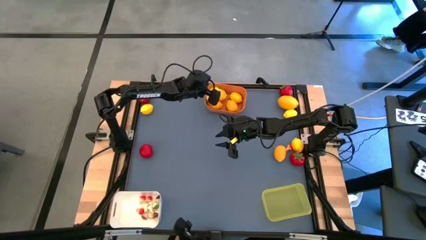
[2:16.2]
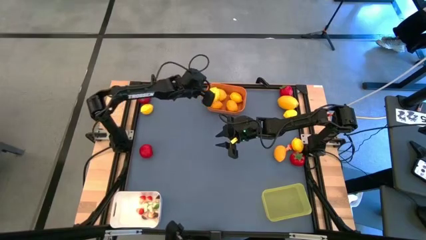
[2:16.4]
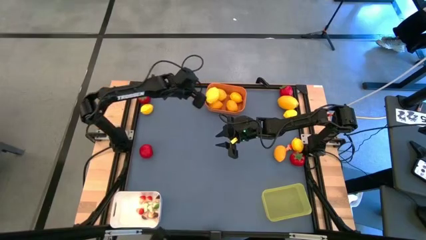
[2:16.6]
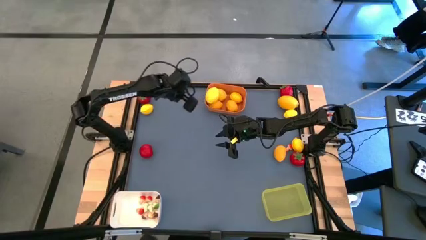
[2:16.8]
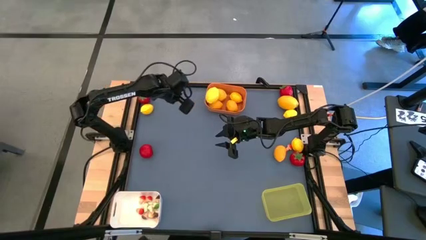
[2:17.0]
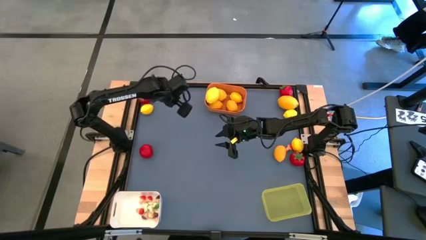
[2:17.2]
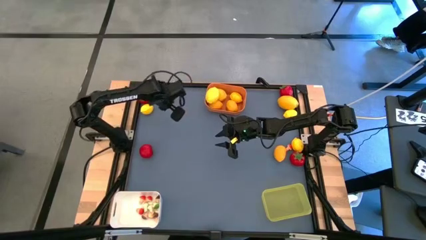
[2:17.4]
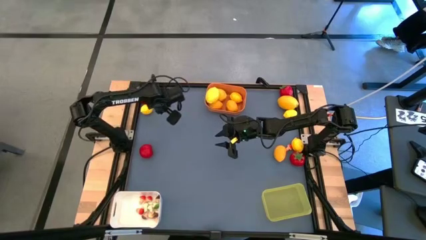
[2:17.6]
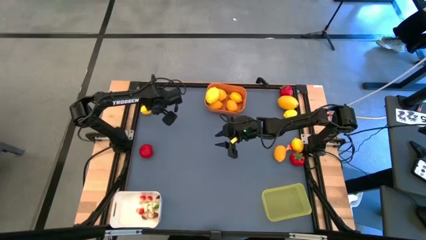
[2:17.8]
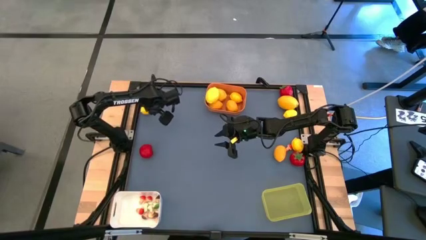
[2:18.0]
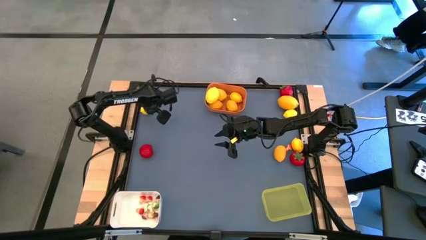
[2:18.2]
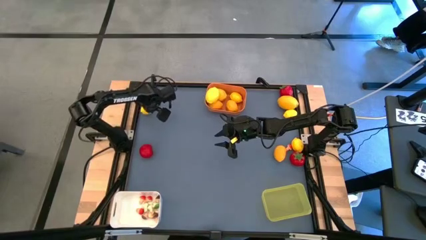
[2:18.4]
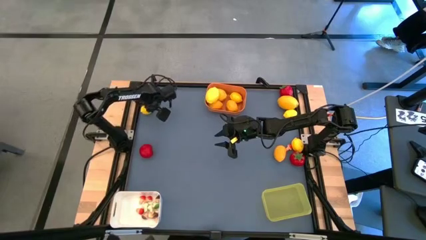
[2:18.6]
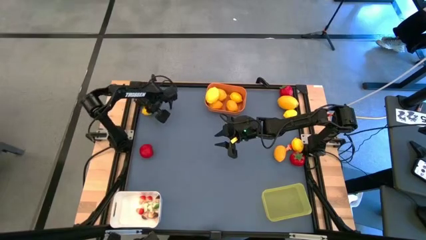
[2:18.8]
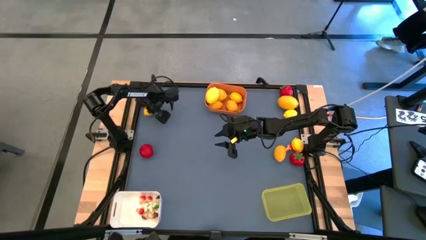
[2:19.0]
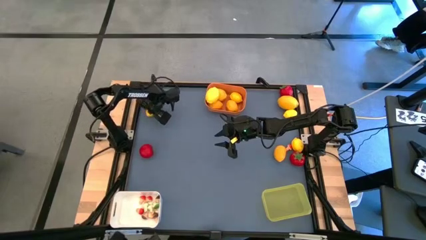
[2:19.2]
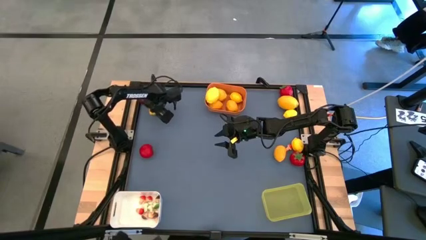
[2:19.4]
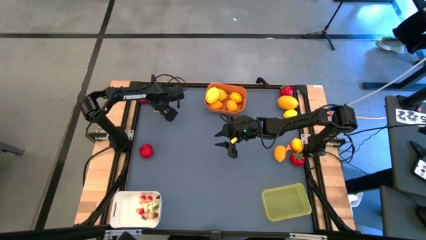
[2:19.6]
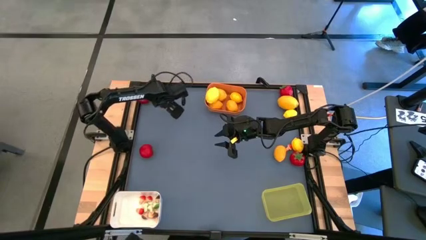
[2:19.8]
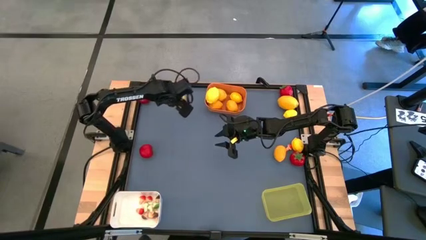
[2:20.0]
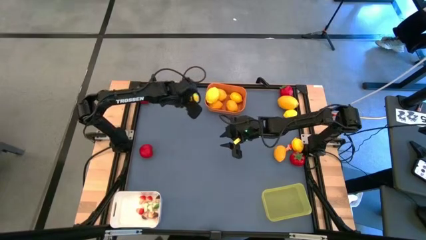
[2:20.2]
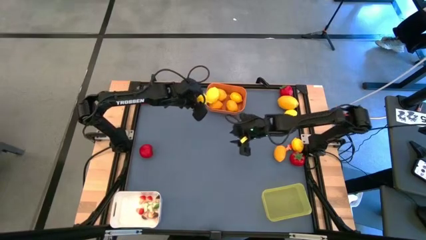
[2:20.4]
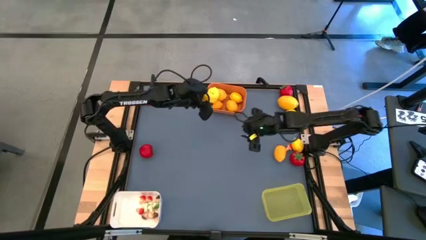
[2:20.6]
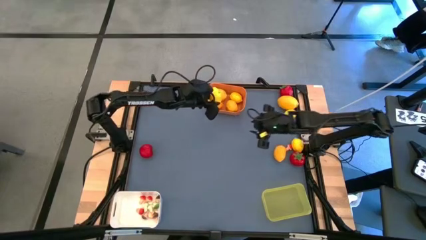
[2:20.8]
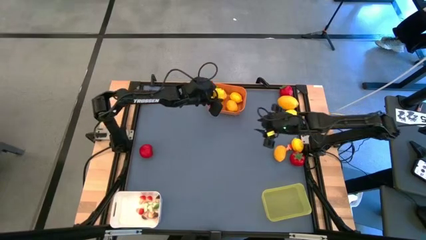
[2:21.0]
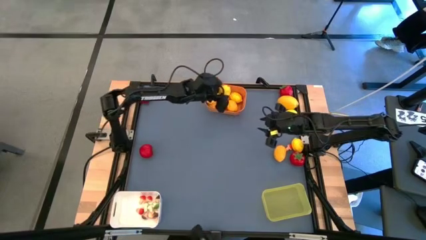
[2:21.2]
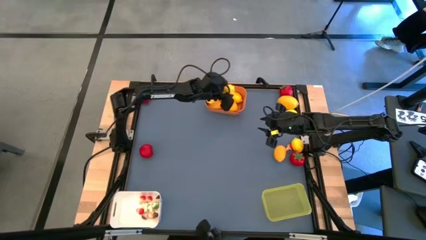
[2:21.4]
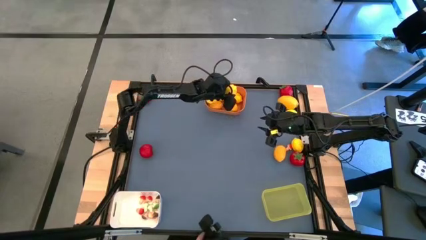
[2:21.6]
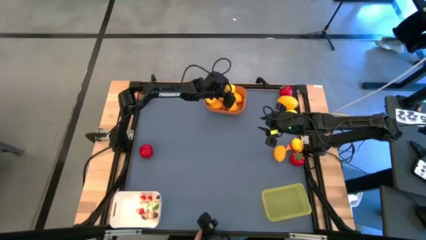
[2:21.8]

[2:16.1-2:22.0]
Task: Sort produce into baskets
Put the yellow lemon into the orange bin

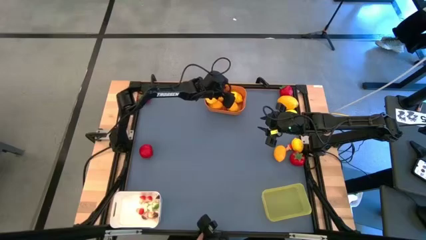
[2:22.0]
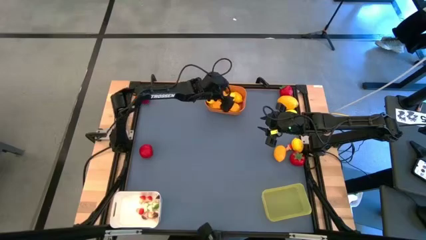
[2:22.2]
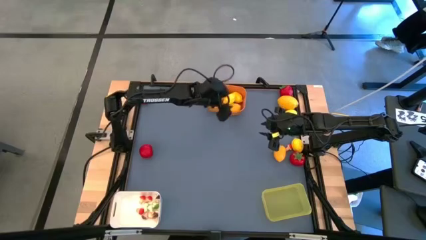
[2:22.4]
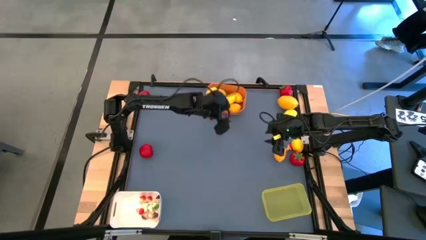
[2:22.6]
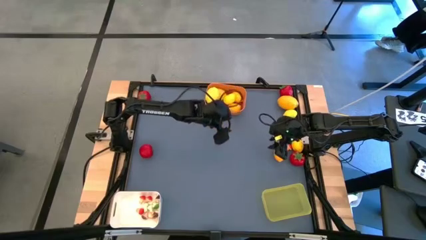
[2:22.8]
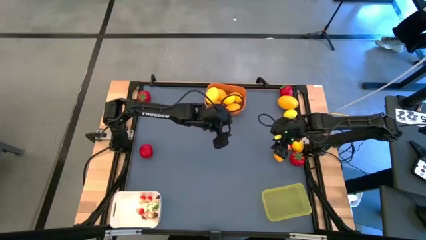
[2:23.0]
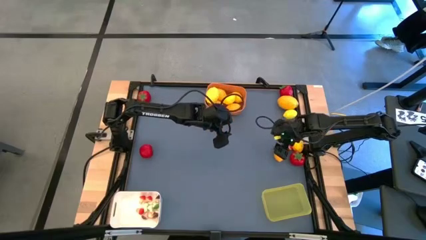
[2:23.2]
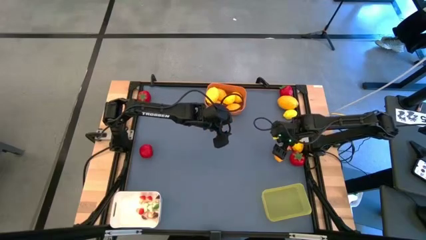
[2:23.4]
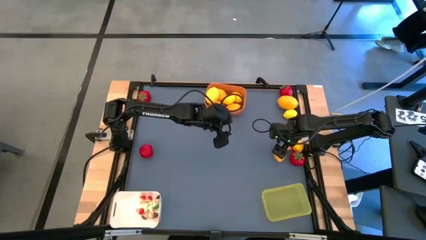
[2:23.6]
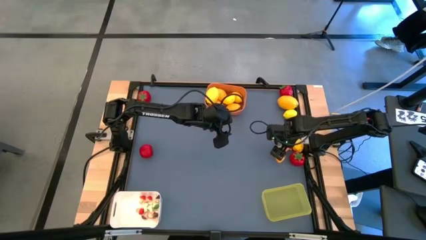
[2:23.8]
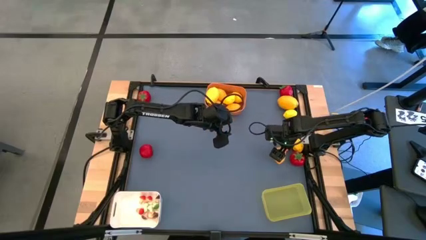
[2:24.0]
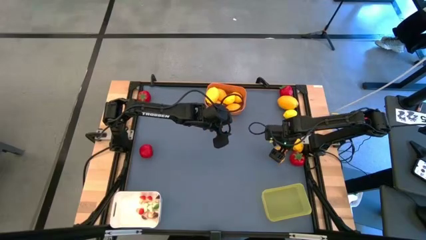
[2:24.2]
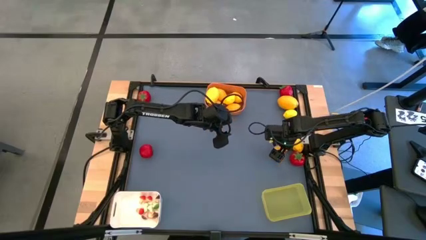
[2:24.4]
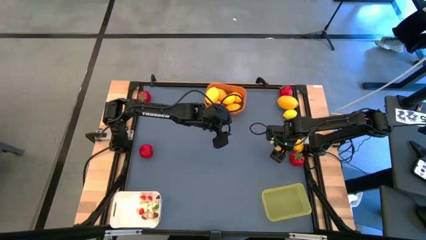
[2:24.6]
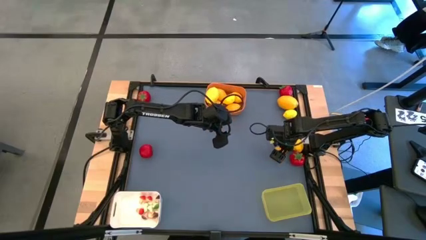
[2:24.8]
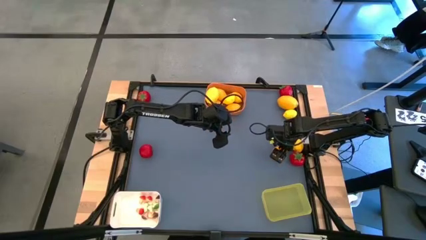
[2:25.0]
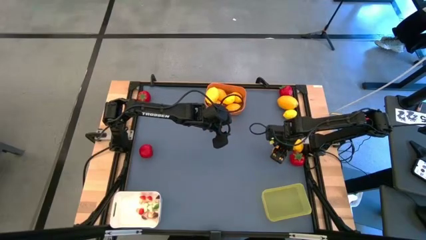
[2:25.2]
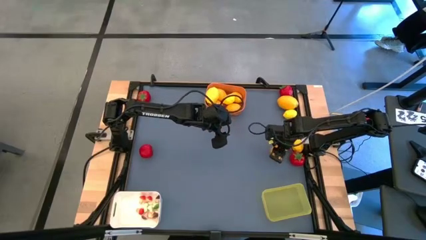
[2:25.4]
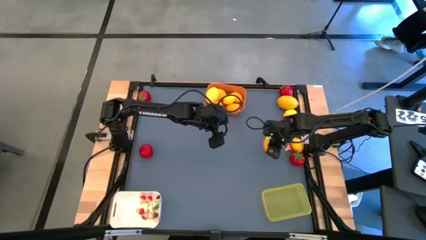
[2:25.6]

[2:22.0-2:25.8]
Put the yellow lemon into the orange bin

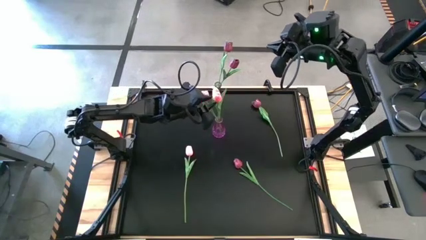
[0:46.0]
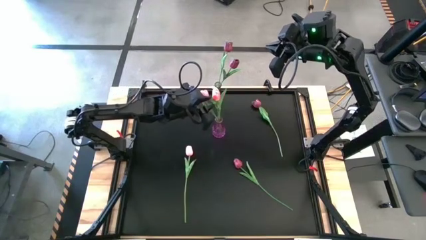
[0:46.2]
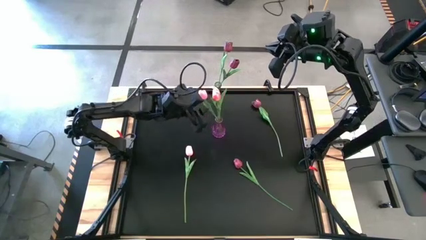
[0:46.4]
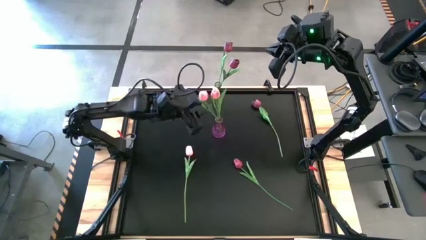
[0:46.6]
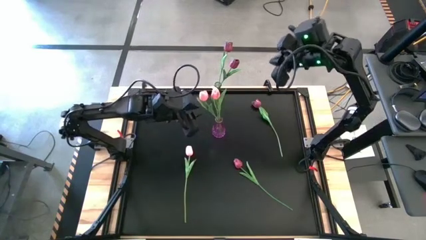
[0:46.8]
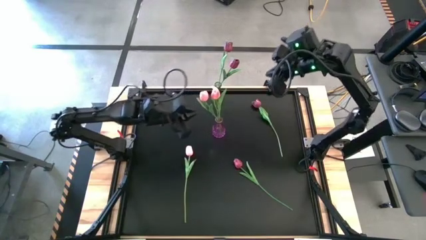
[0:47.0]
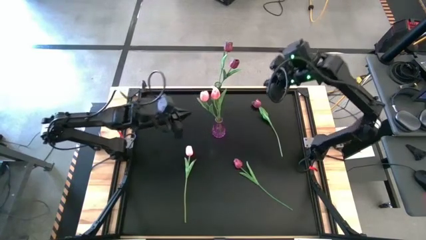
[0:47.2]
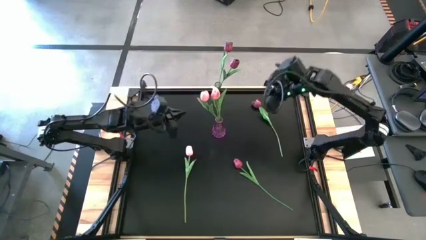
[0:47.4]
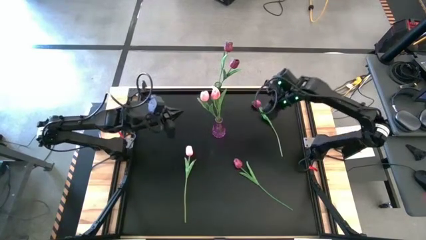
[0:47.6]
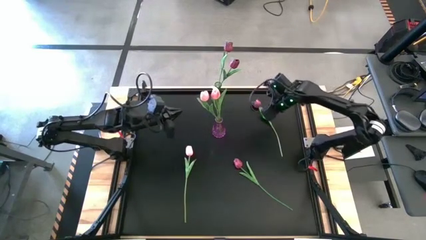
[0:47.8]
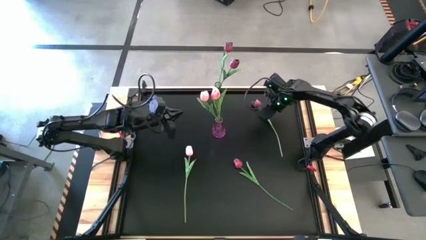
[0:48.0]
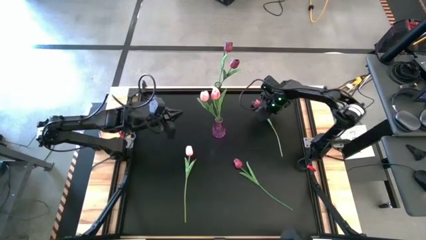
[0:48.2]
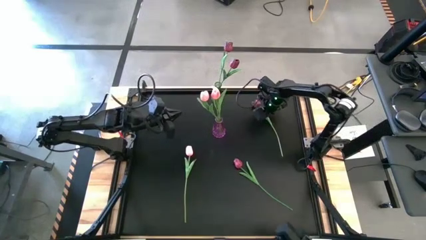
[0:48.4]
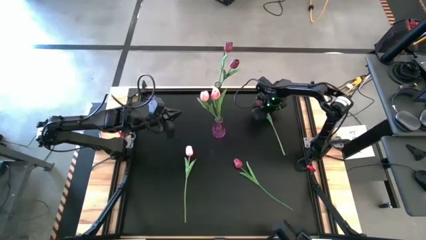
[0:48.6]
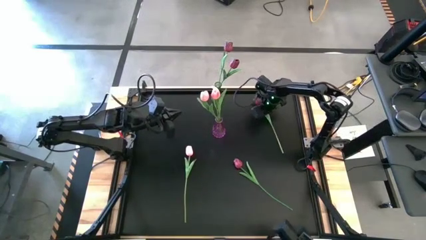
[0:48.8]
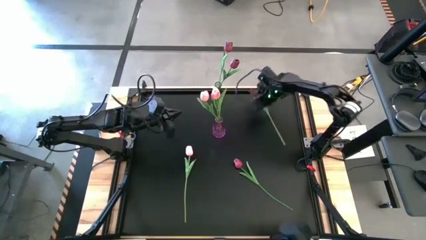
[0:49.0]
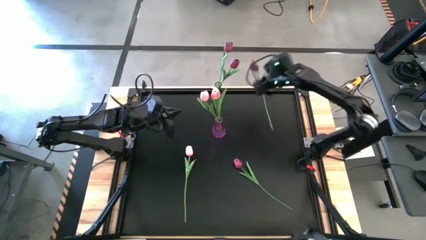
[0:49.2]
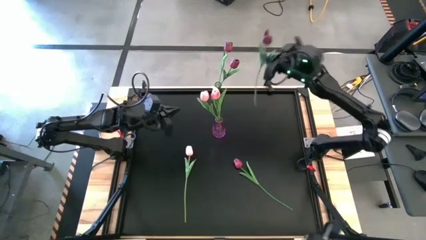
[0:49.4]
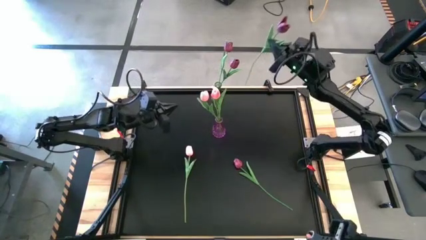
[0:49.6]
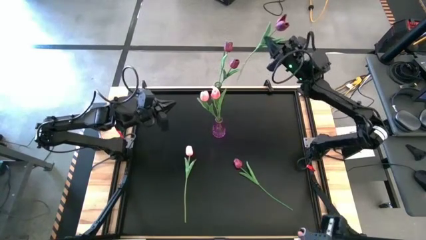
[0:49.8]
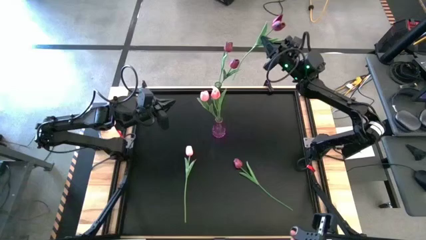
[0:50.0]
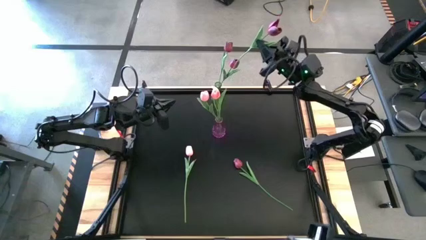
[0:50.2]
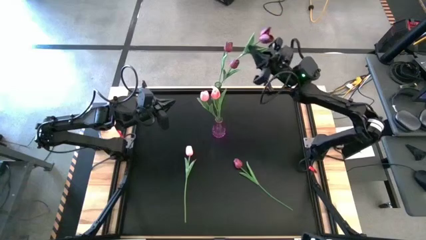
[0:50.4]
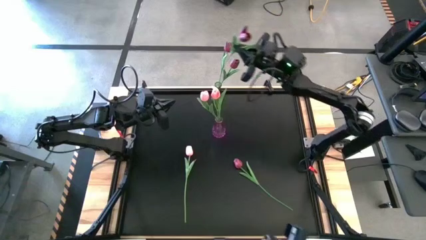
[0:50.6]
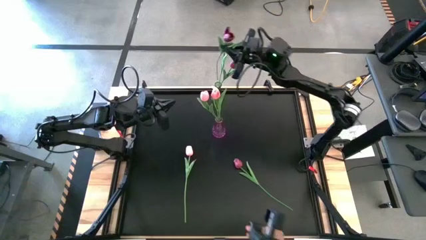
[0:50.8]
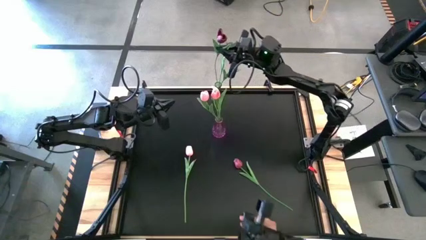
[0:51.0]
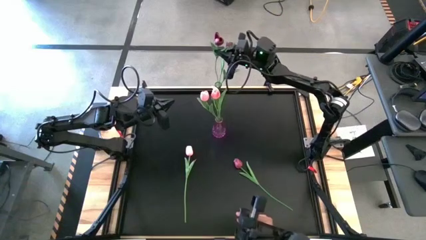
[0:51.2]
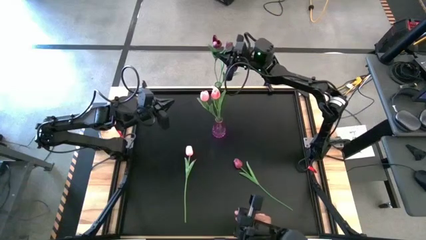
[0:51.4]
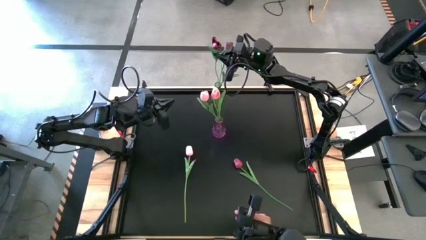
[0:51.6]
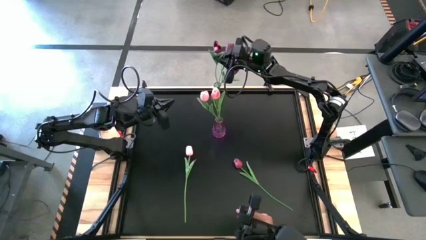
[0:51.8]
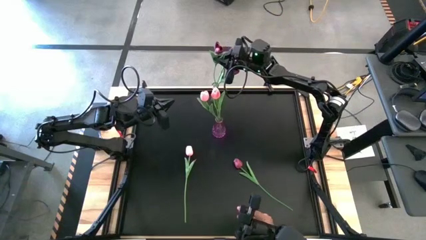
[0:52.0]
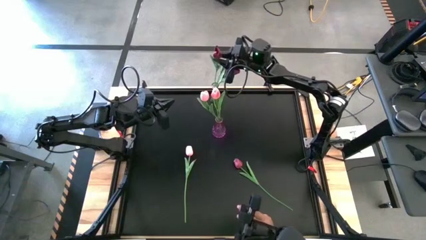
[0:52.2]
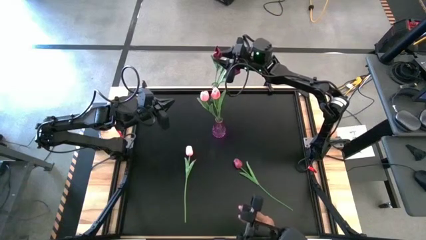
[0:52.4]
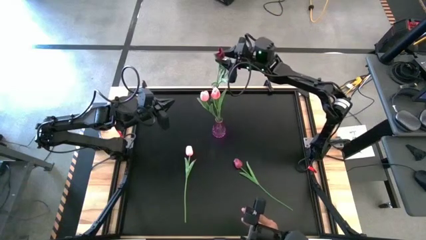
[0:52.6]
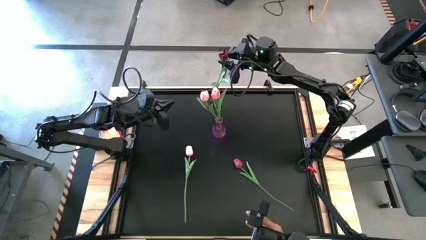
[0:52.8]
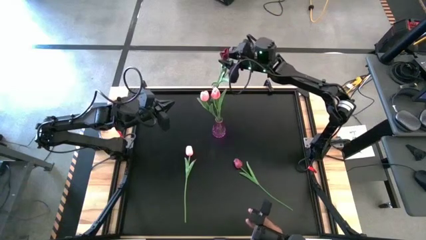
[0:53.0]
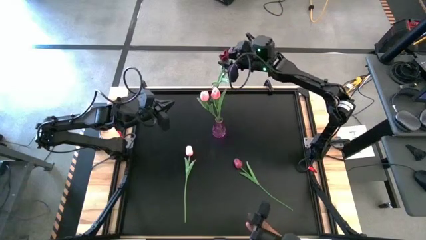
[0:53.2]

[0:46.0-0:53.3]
Task: Sort flowers into vase by color
Put the top red tulip into the green vase
